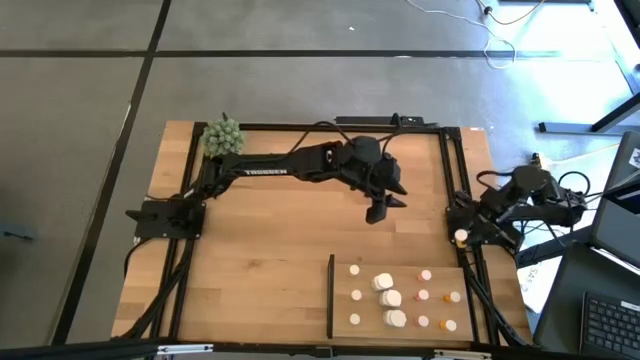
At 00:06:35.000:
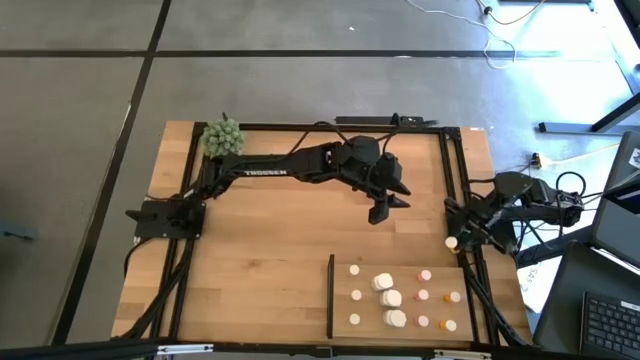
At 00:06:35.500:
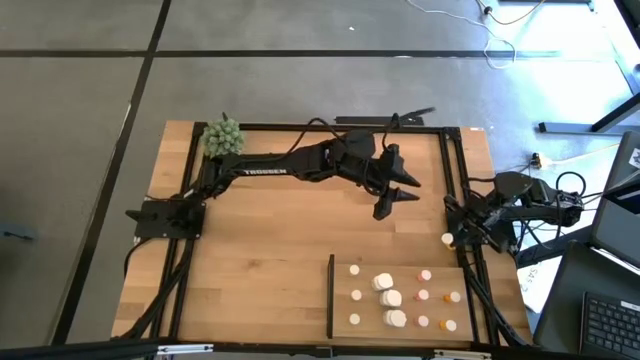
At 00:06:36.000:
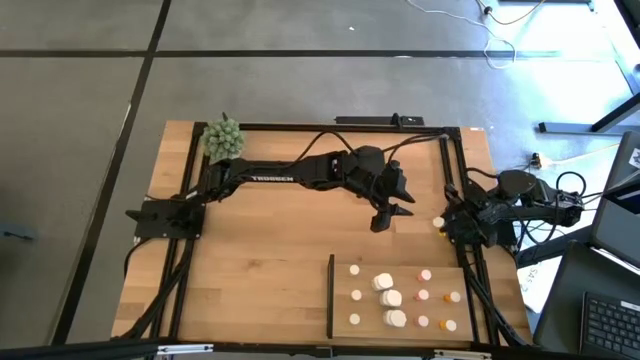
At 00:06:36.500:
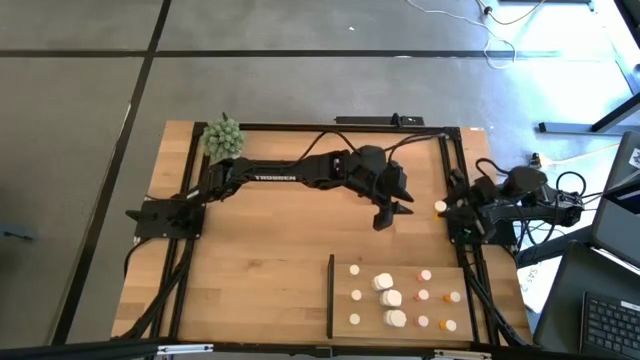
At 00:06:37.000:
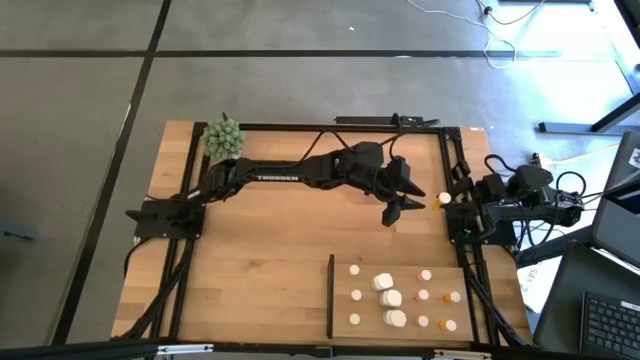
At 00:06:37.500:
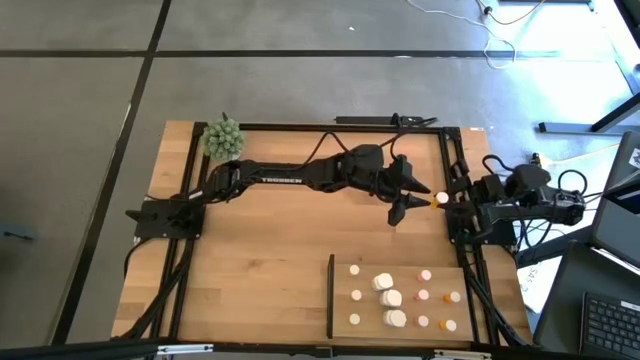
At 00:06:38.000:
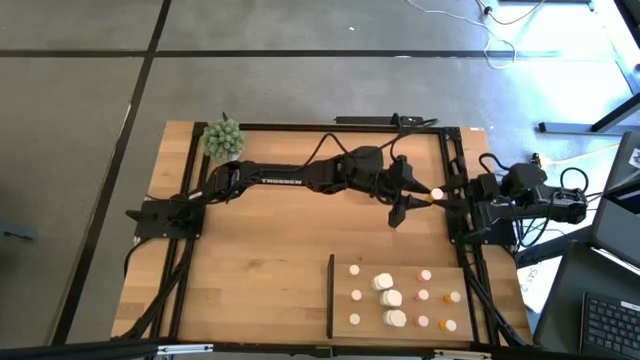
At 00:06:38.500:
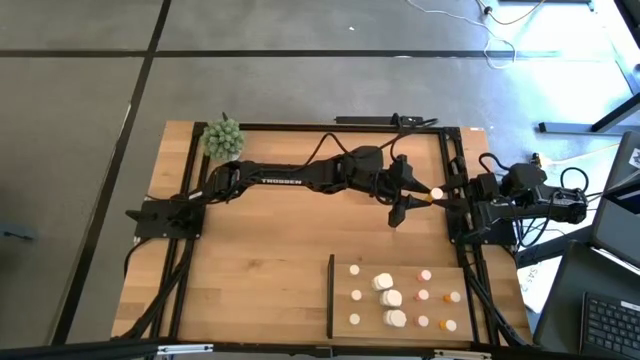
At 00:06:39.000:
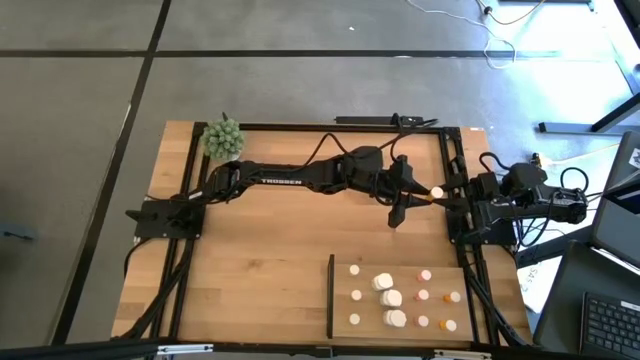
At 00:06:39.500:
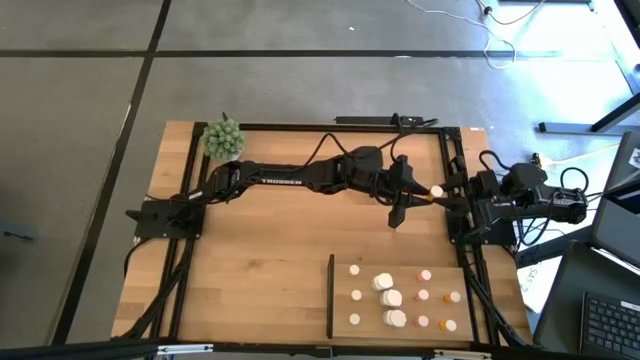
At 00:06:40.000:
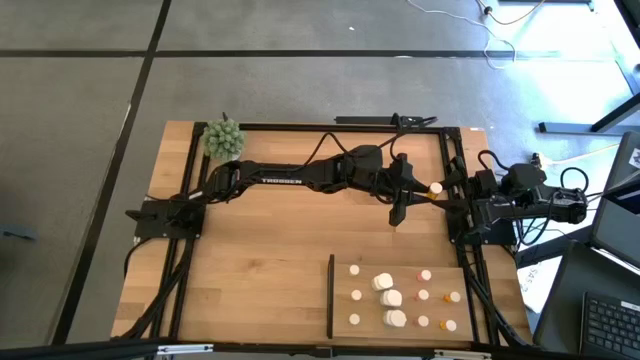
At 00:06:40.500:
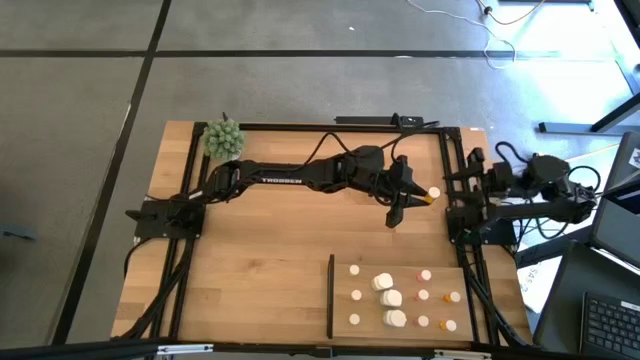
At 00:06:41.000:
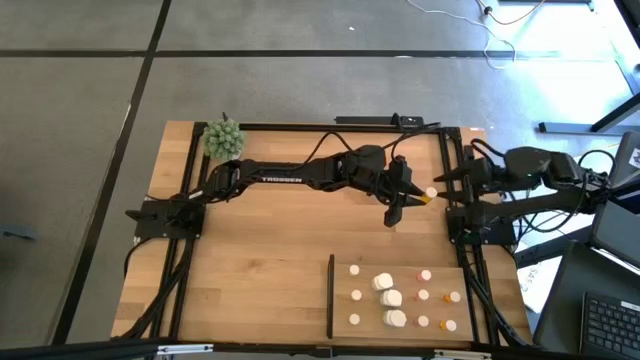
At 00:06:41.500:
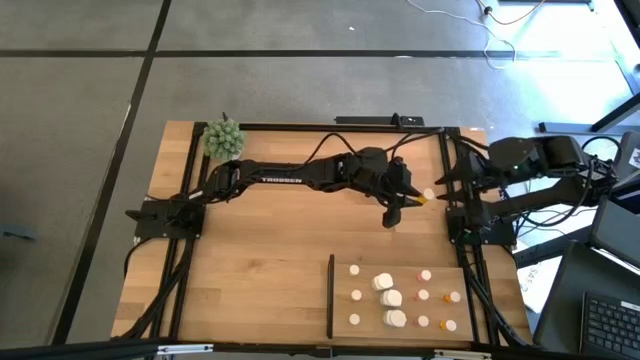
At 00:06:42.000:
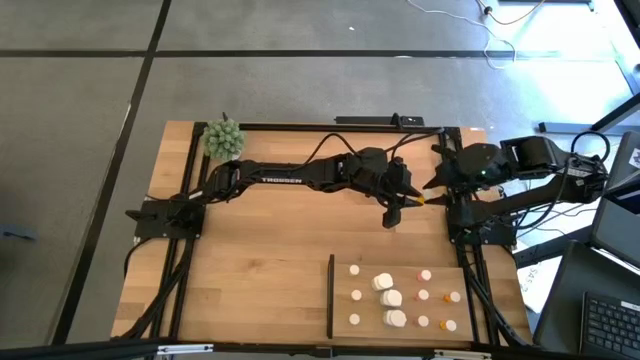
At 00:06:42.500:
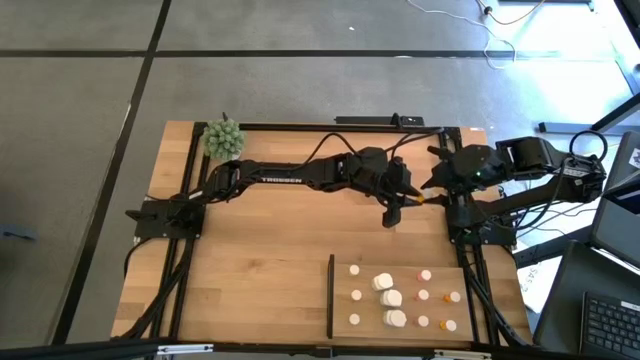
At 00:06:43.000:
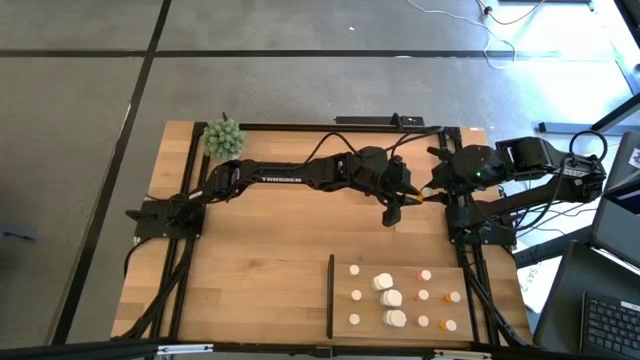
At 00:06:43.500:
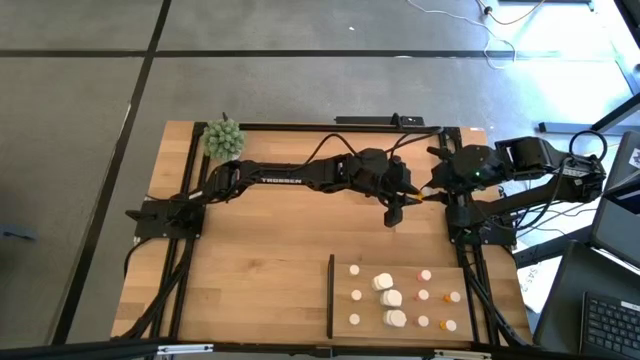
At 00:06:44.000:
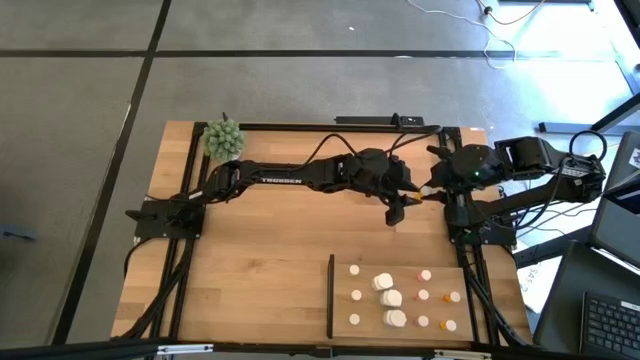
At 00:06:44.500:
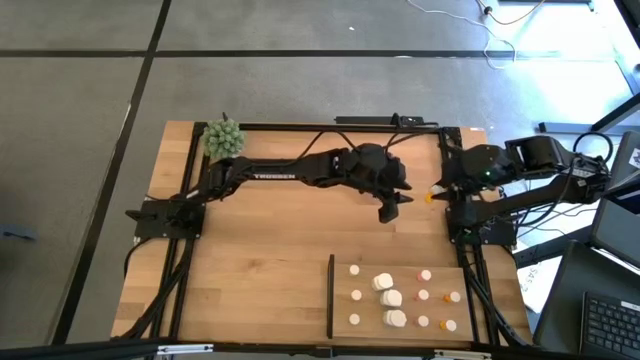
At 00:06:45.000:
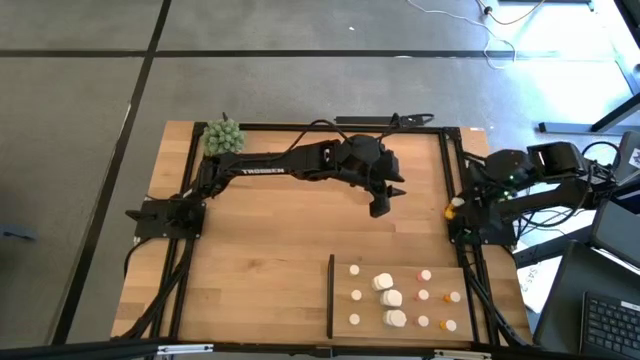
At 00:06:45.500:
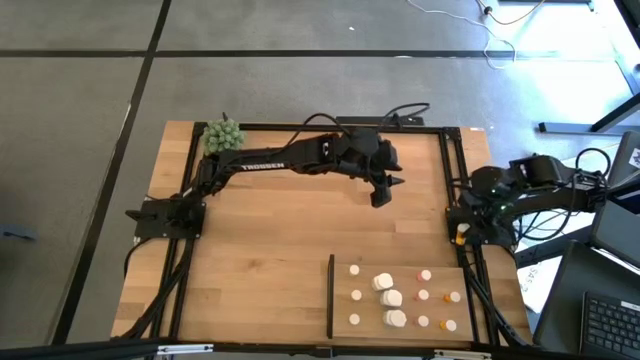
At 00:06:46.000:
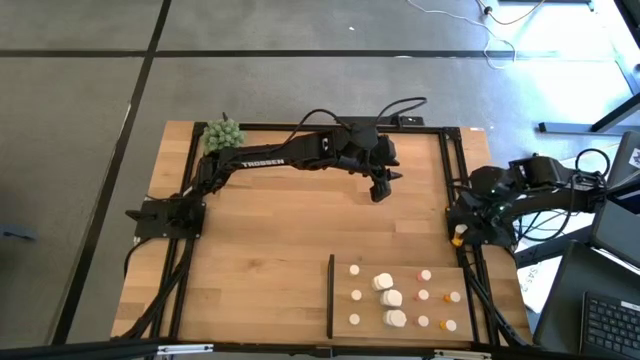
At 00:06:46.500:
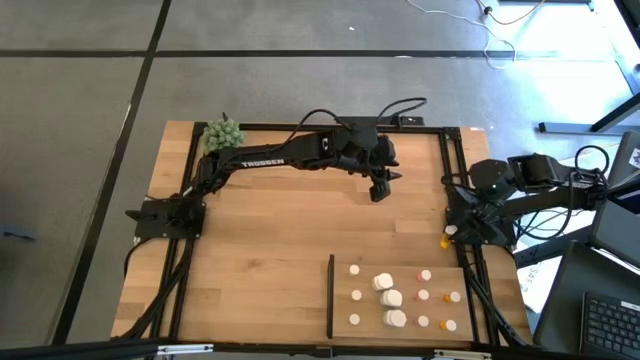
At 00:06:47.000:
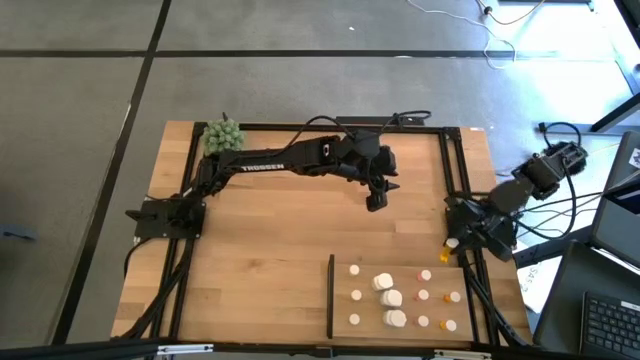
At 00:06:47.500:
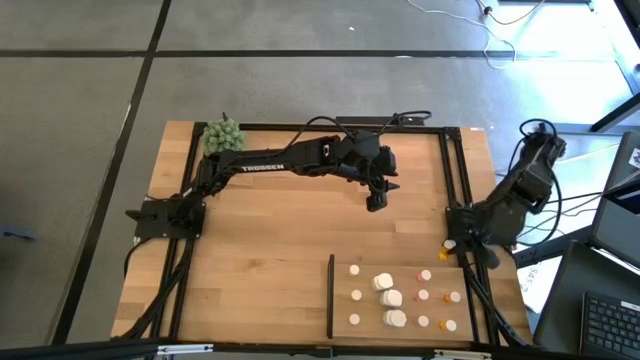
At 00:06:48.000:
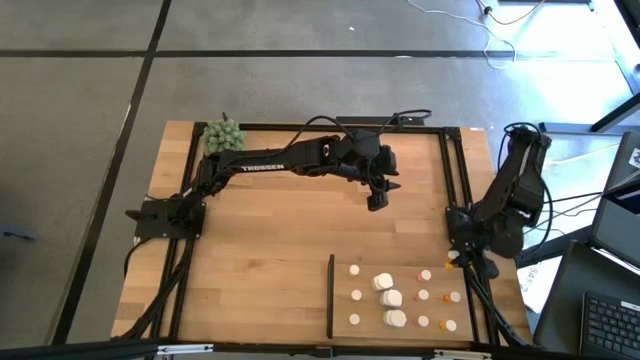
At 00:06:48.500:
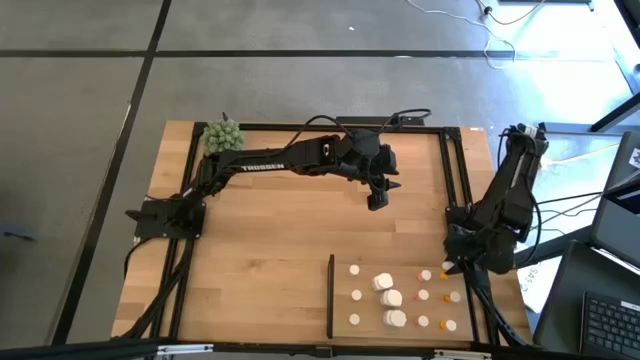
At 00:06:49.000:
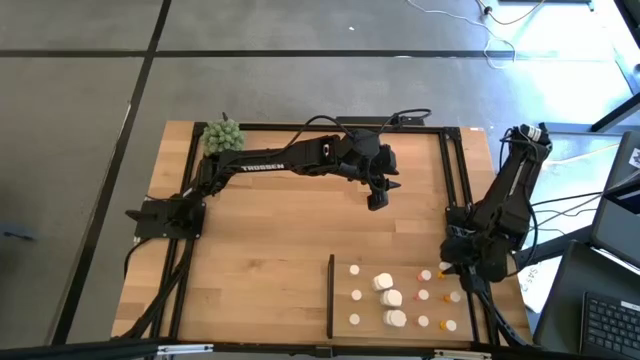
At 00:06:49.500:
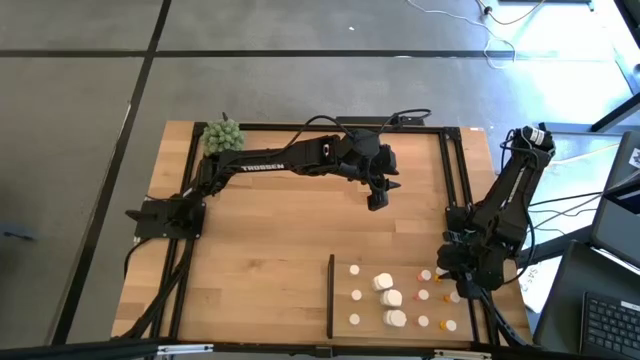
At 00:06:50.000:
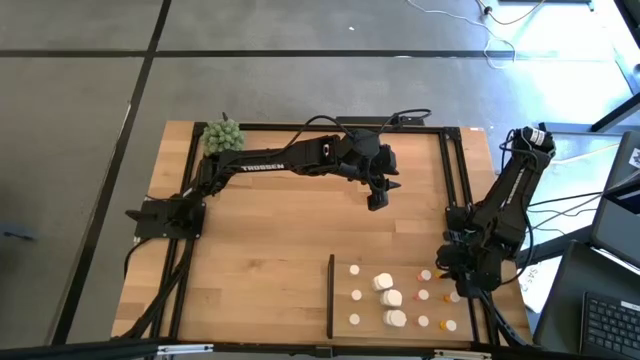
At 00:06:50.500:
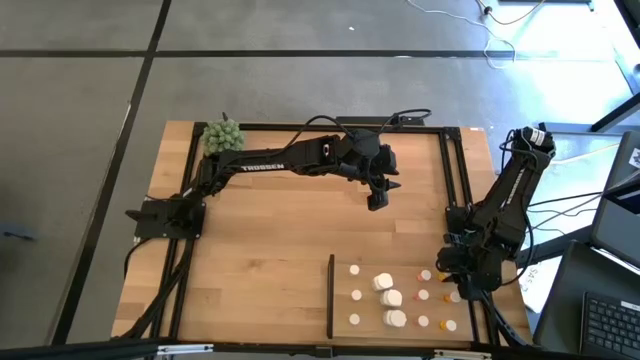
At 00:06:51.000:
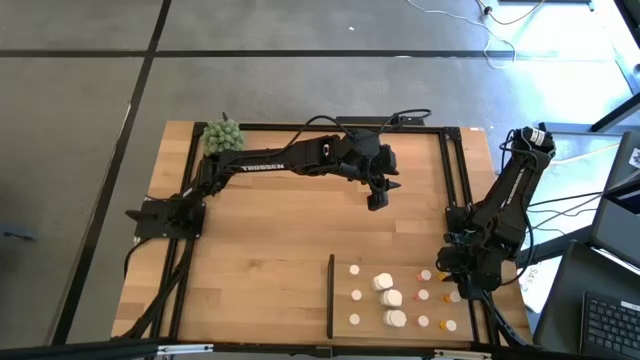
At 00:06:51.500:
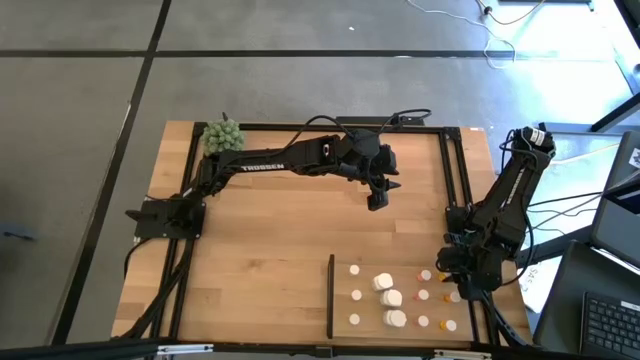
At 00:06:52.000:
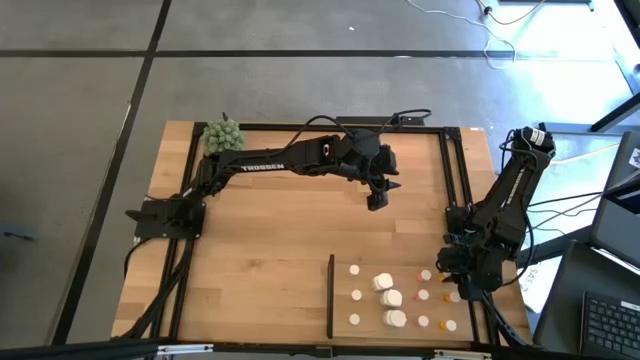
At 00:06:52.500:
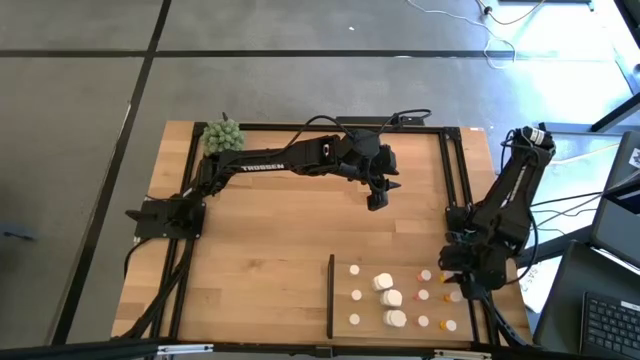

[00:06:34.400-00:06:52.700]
Task: Pick and place medicine bottles onto shelf by color
Put the orange pill bottle on the shelf aligned with the other orange pill bottles

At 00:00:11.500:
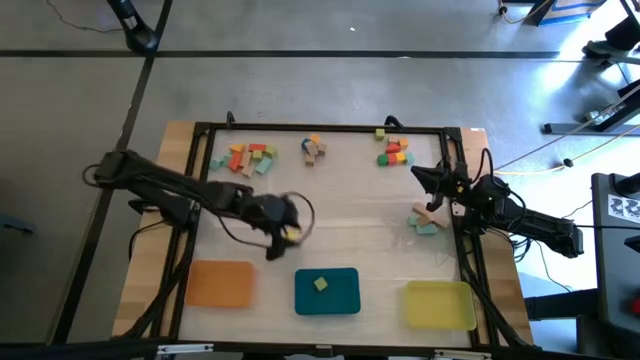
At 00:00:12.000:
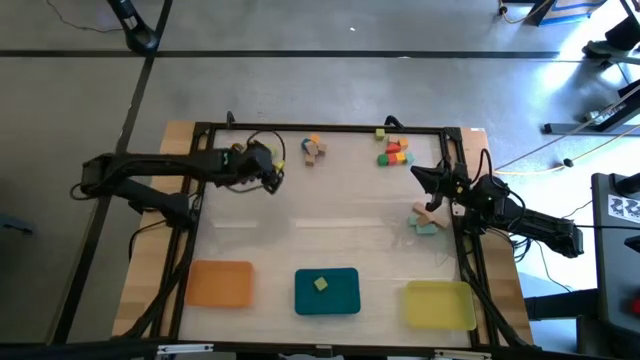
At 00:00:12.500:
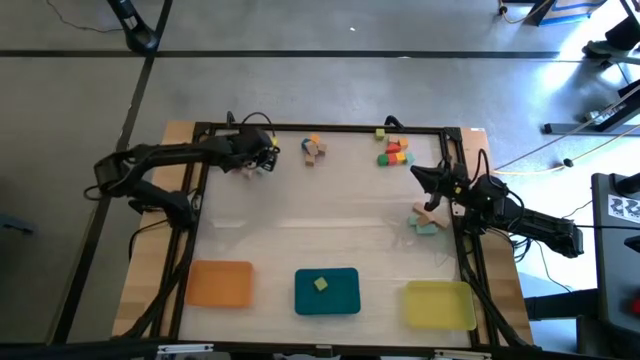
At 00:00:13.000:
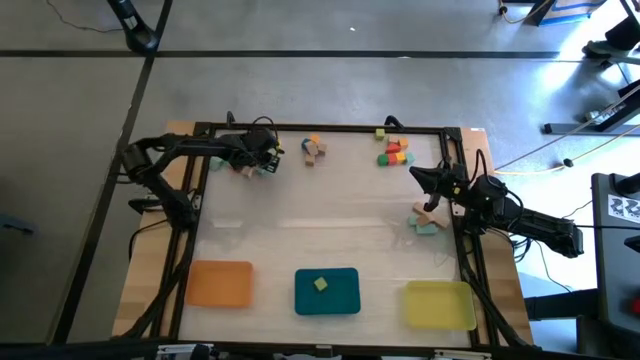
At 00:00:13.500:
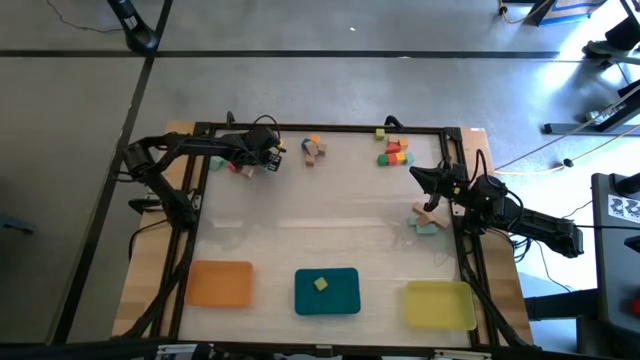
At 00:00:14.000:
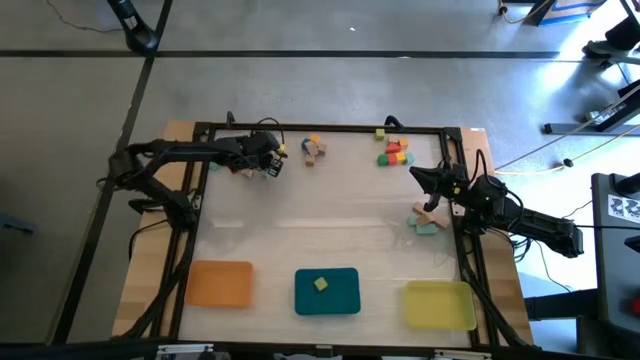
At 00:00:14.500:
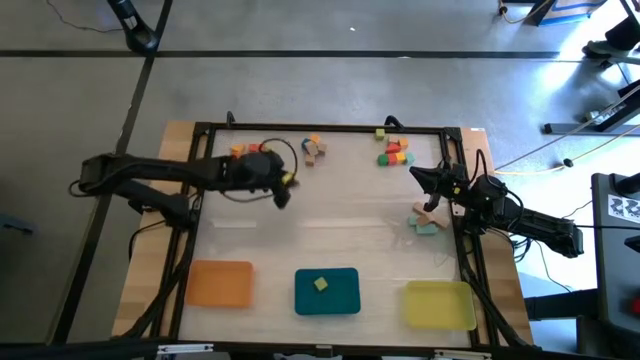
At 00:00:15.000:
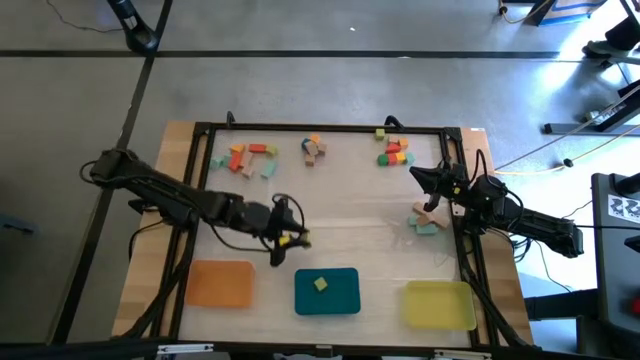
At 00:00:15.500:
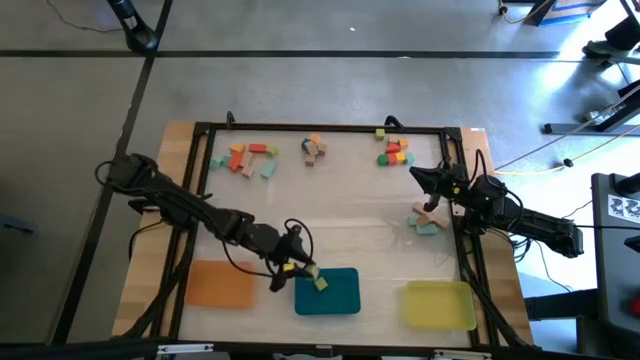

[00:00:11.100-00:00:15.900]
Task: Sort blocks by size
Put the light green cube block into the blue bin
